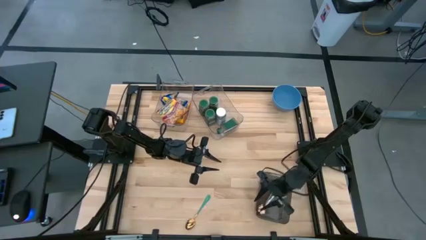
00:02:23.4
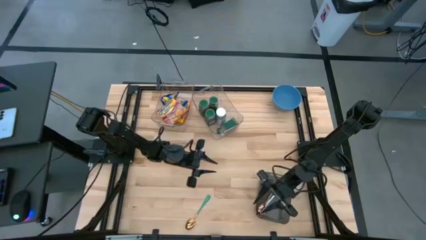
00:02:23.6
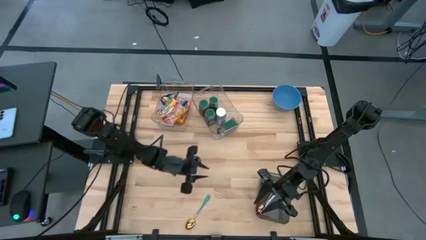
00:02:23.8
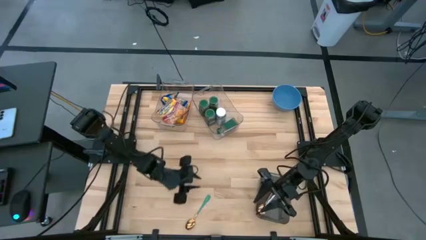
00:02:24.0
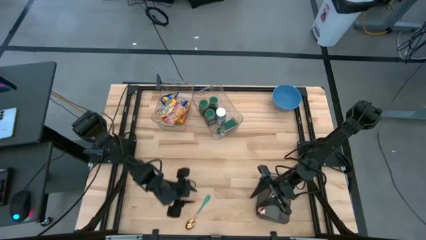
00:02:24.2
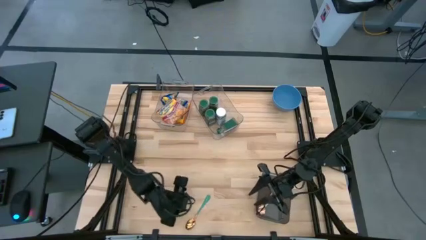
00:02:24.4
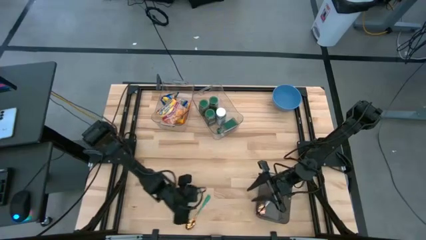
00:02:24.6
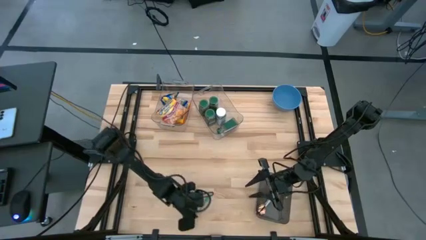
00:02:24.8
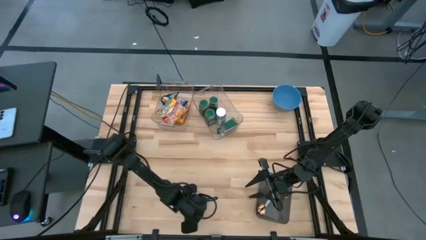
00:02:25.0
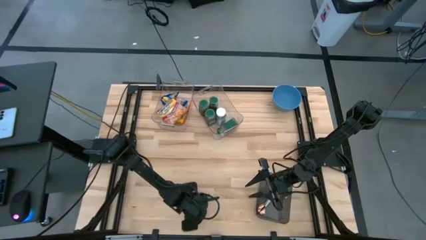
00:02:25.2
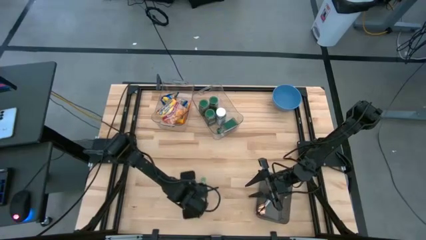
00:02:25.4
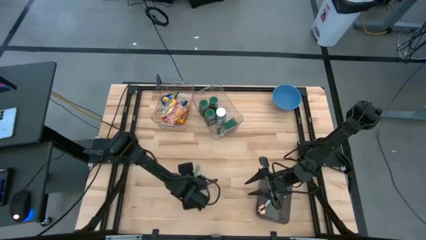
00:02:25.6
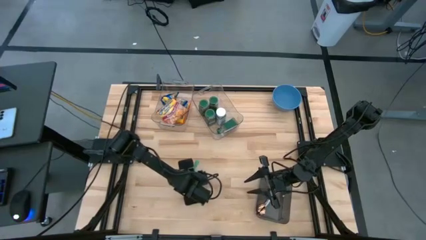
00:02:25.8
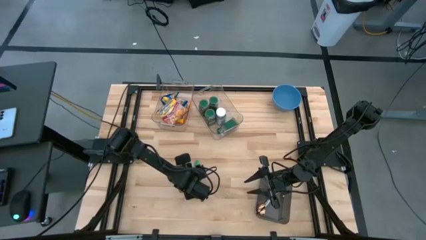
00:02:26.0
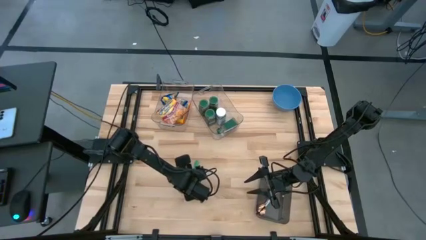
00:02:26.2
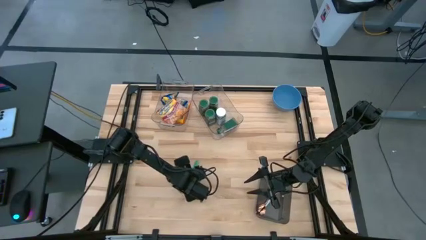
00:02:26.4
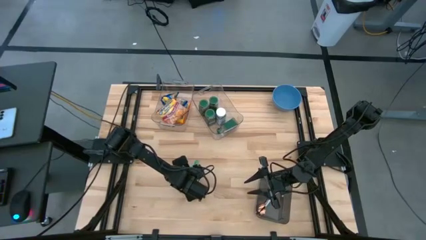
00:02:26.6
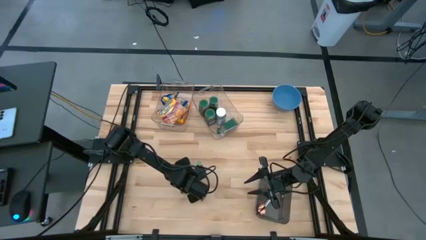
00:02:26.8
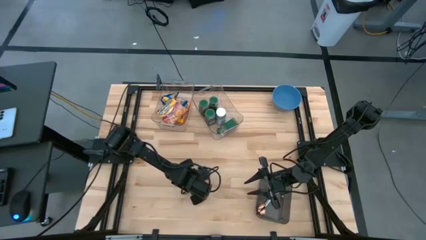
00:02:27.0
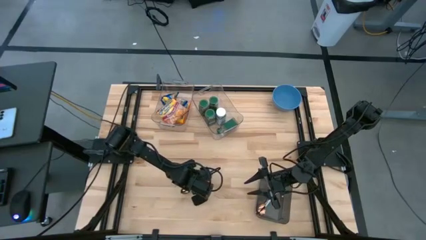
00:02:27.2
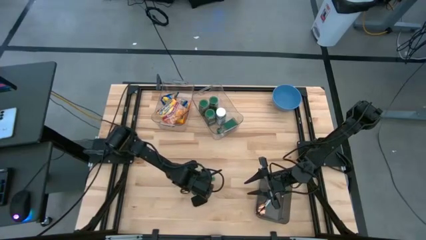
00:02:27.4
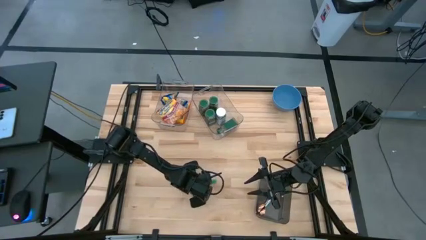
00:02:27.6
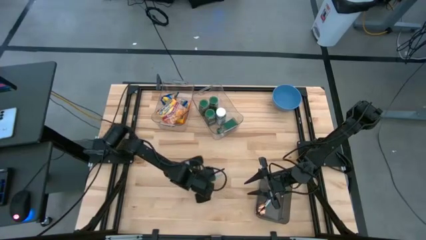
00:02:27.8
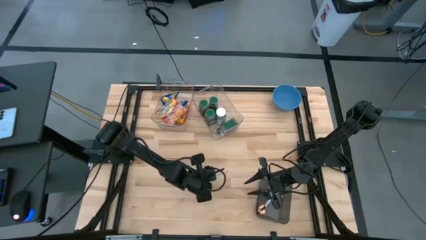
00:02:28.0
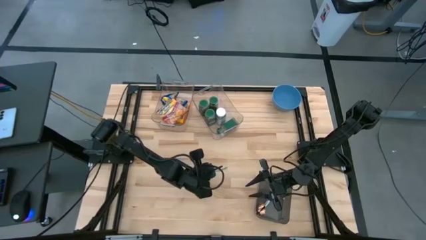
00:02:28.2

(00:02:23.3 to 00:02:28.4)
Put the green spoon into the gray bin

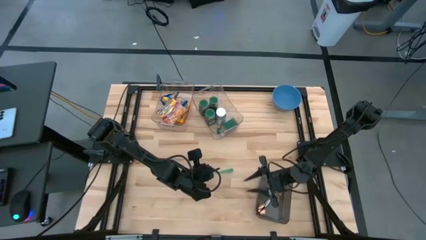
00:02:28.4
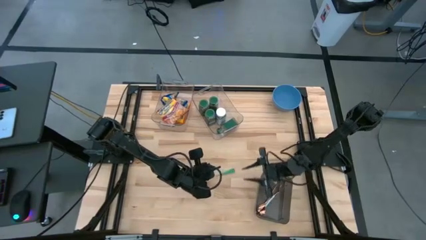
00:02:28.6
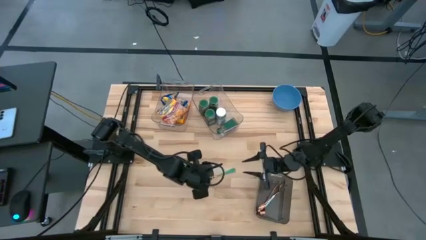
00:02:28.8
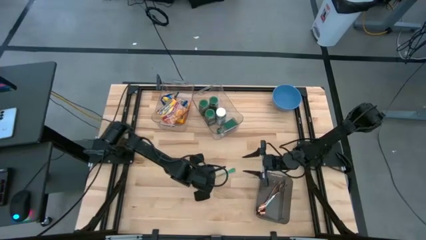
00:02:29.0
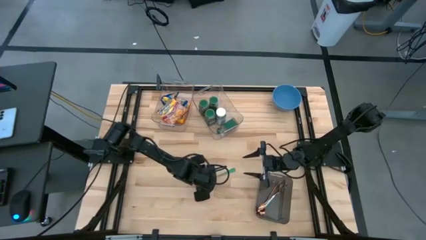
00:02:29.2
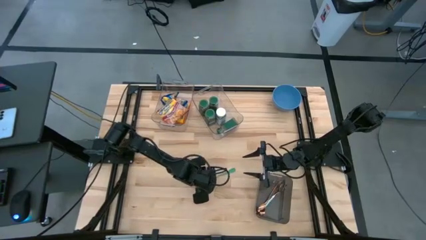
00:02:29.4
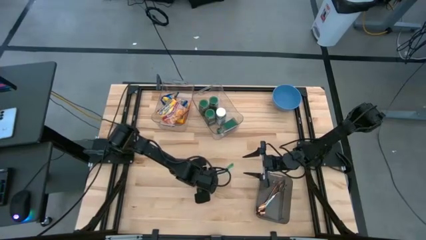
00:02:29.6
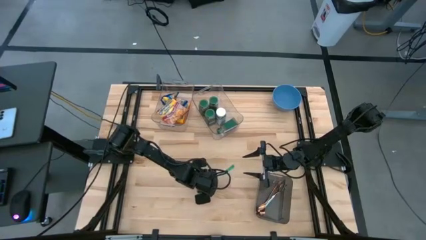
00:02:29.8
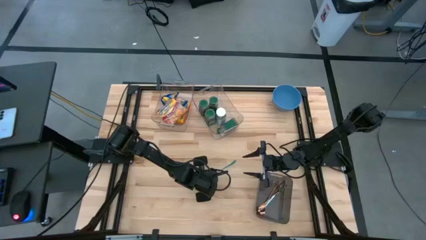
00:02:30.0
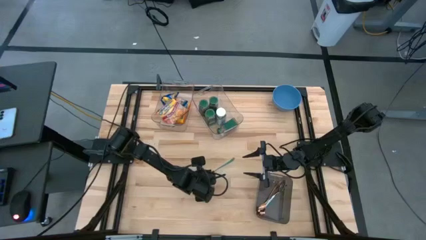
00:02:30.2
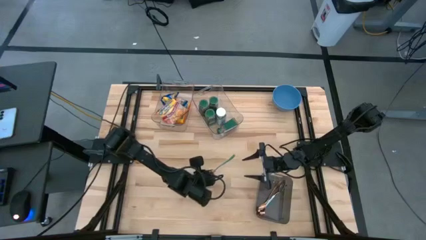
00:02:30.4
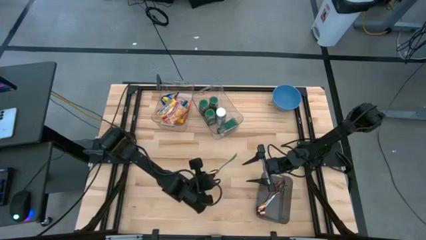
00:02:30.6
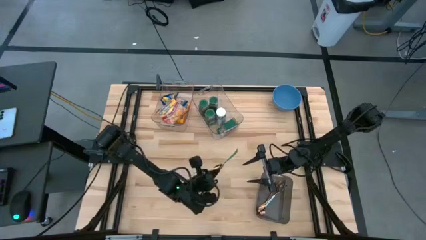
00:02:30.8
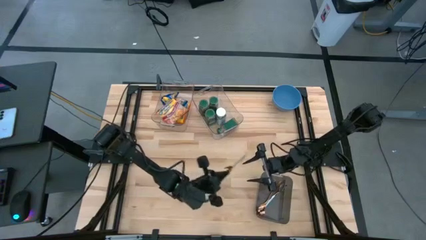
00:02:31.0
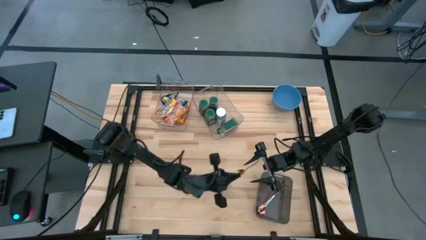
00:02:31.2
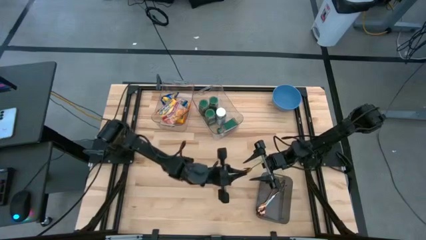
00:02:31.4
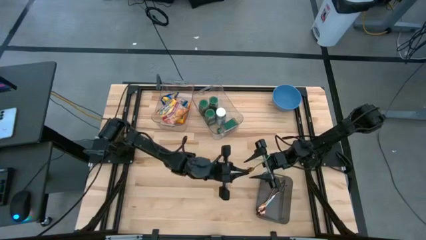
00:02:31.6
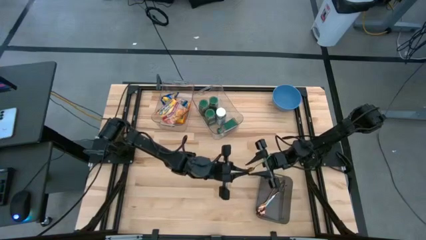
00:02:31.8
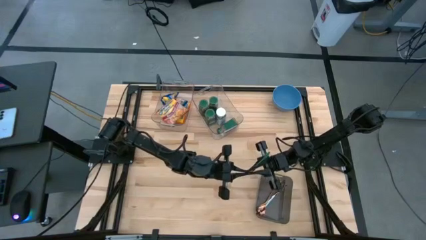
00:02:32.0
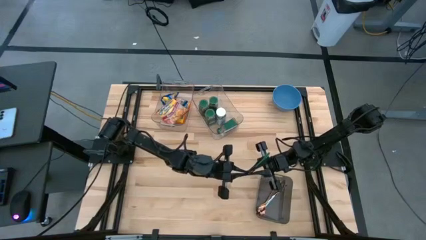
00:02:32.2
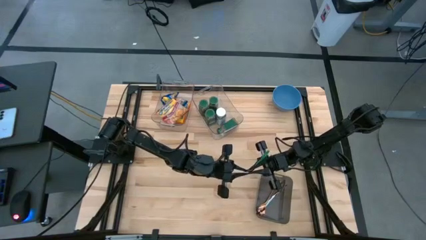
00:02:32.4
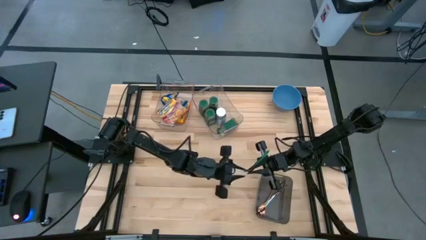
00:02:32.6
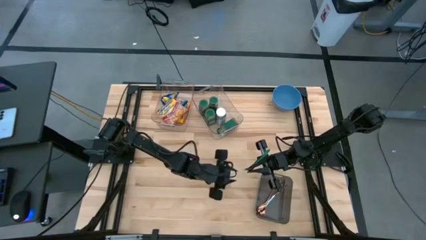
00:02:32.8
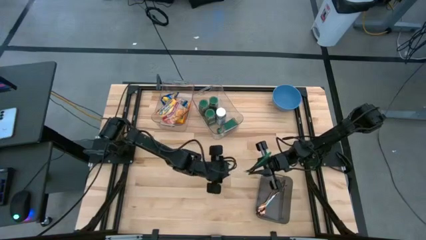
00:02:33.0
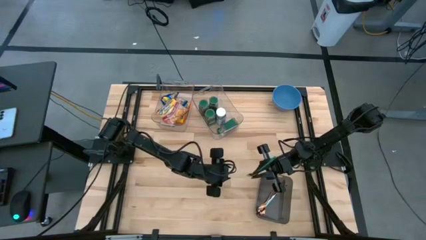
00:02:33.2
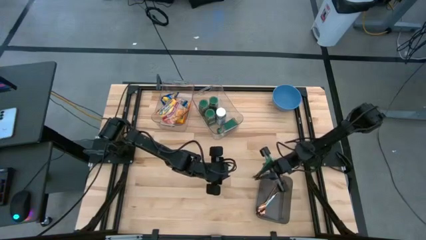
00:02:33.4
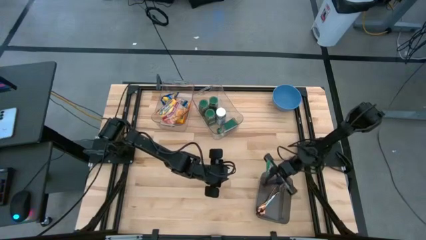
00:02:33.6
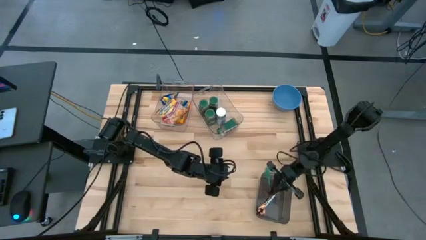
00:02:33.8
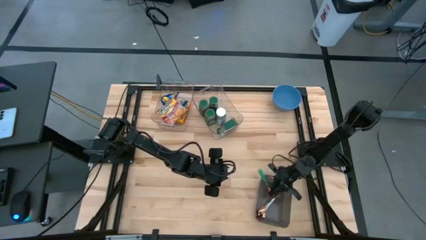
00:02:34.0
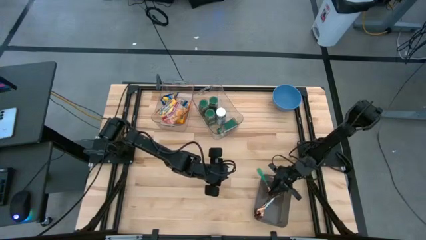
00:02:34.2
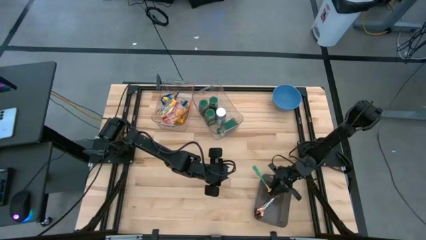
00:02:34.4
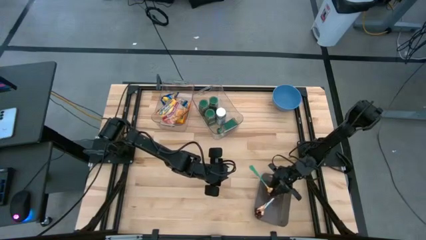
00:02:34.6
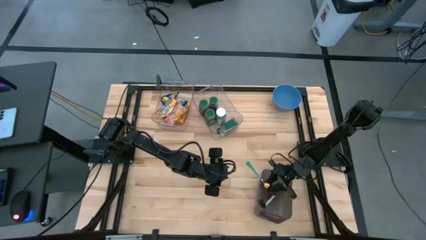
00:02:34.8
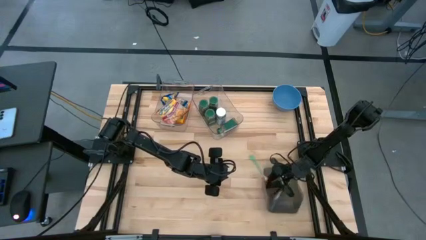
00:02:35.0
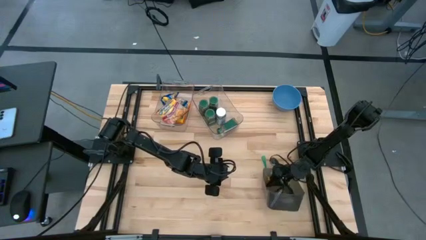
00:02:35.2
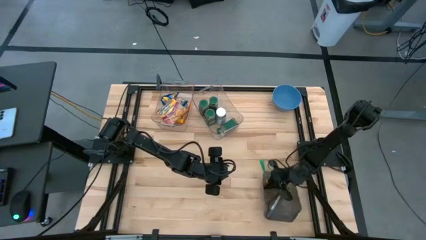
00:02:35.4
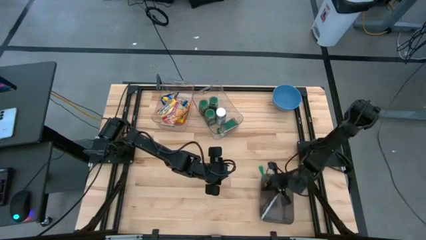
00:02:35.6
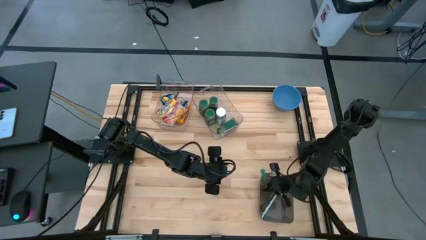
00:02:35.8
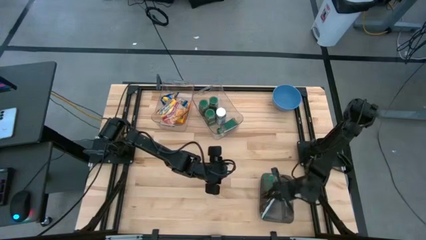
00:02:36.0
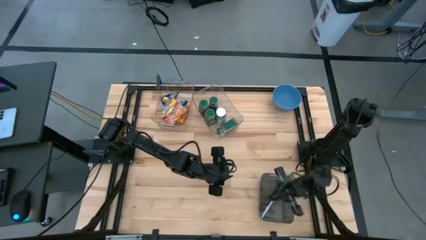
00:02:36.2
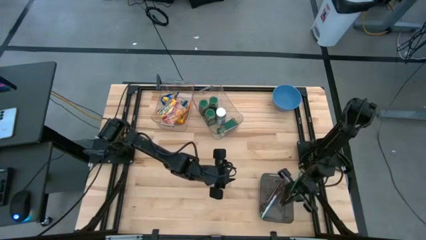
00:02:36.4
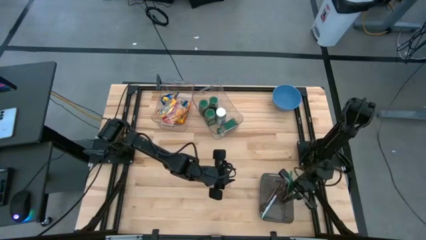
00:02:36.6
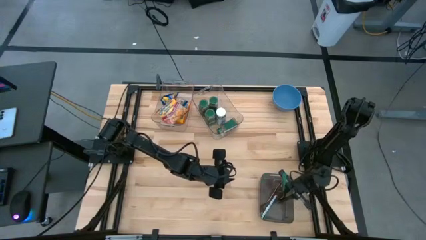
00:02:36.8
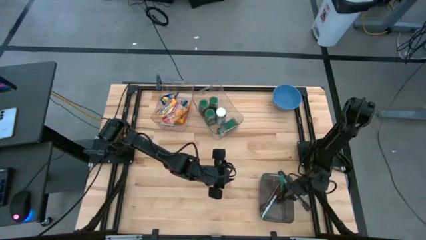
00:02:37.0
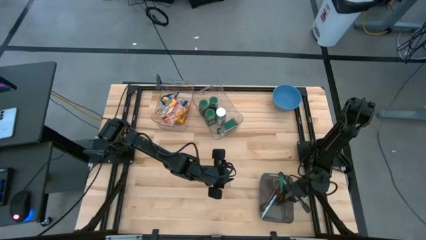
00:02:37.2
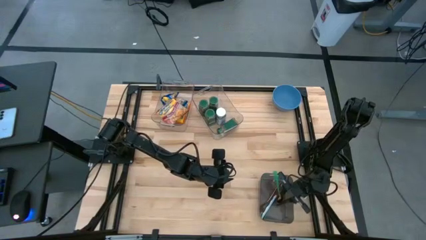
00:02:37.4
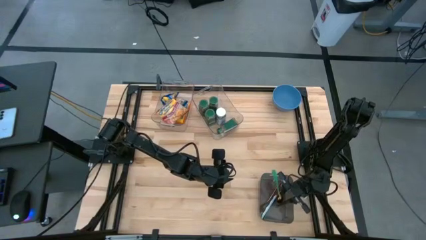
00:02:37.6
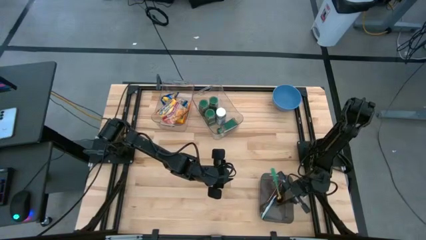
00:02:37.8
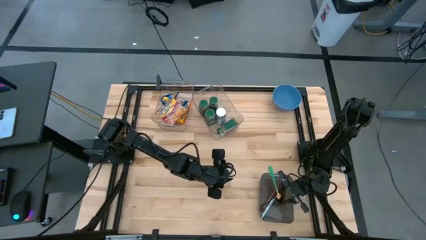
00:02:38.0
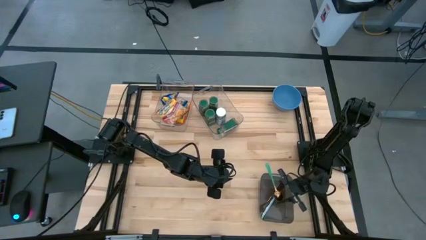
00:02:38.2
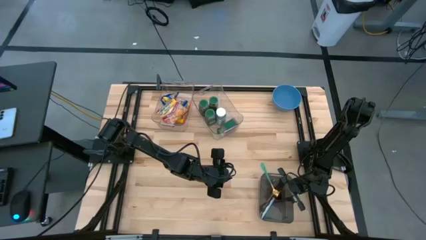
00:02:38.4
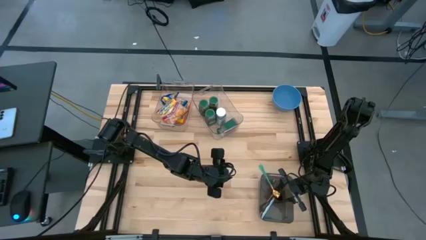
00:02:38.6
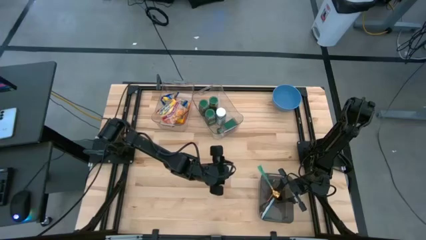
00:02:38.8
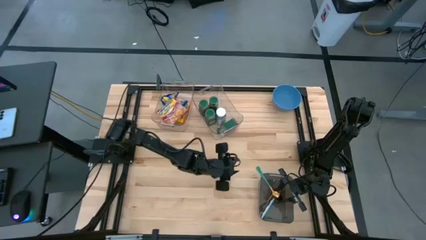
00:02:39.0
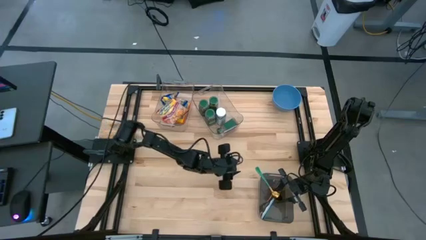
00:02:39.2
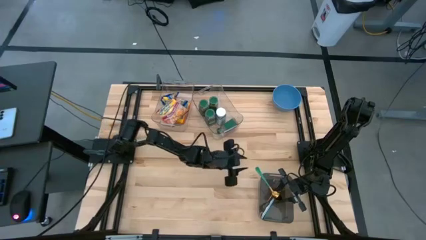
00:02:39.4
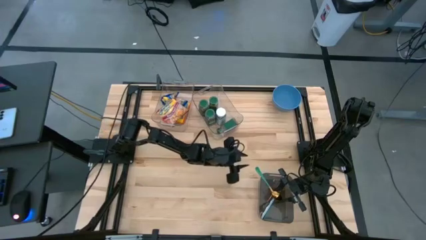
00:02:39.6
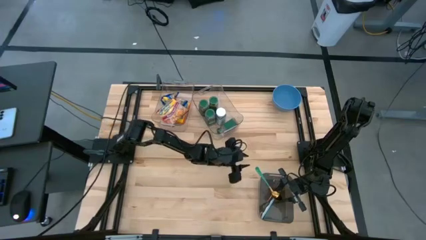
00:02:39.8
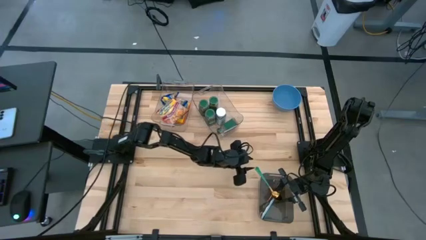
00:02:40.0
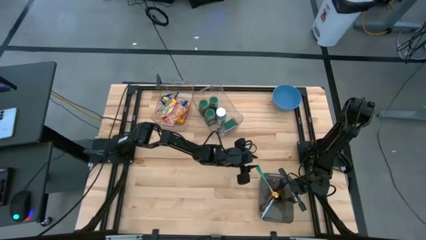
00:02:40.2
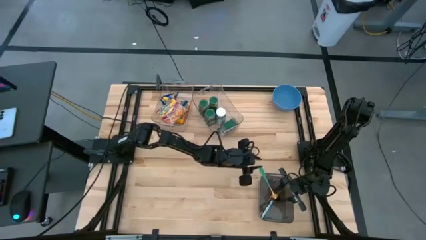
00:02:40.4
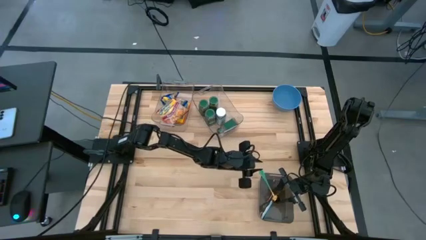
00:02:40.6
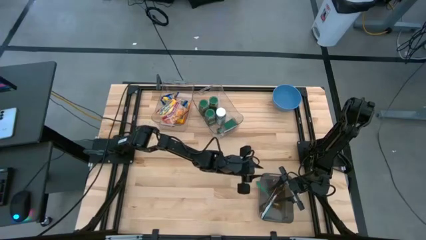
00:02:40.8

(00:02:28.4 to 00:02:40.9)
Put the green spoon into the gray bin
